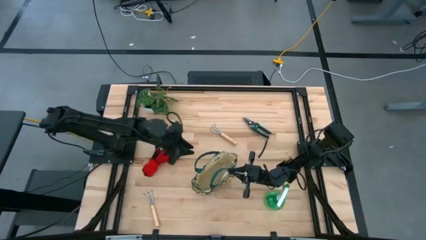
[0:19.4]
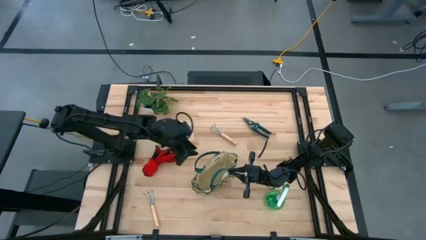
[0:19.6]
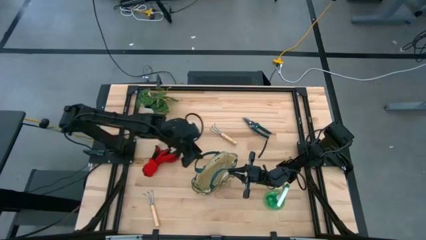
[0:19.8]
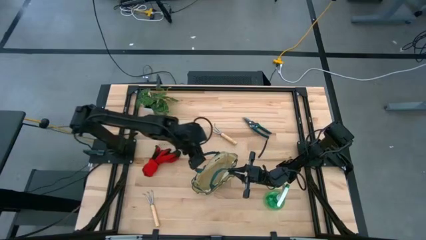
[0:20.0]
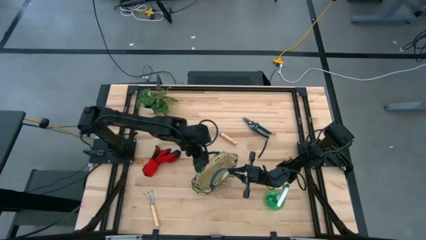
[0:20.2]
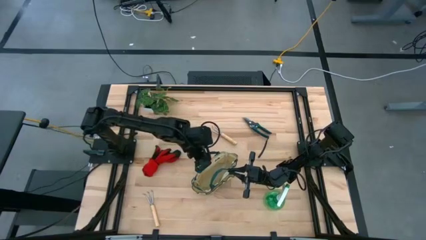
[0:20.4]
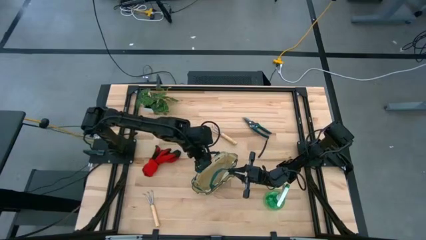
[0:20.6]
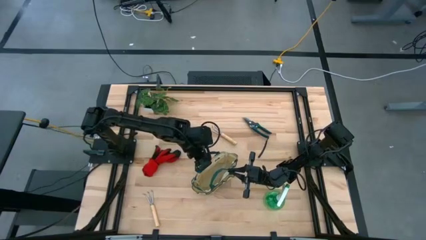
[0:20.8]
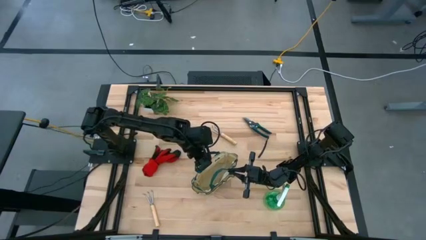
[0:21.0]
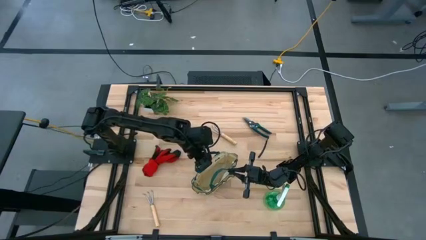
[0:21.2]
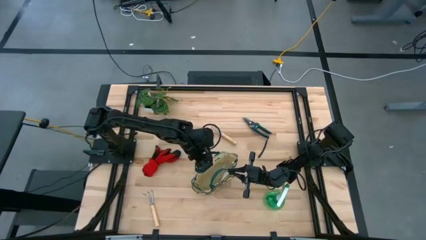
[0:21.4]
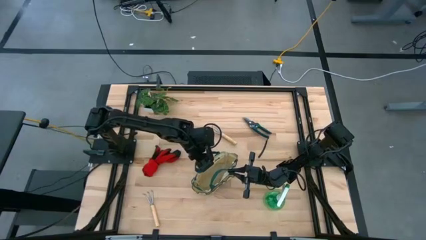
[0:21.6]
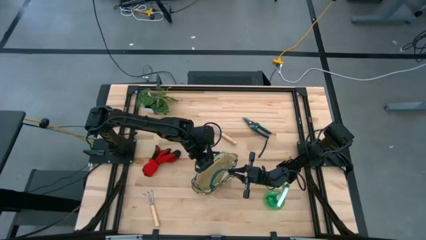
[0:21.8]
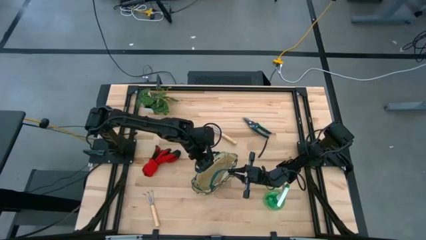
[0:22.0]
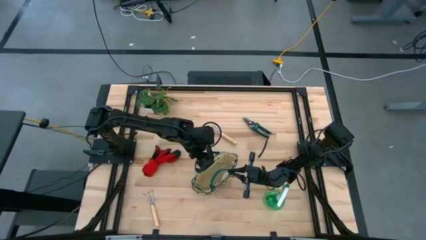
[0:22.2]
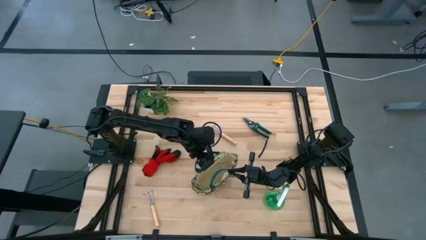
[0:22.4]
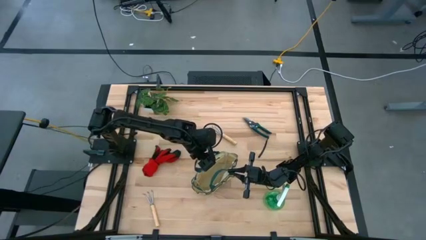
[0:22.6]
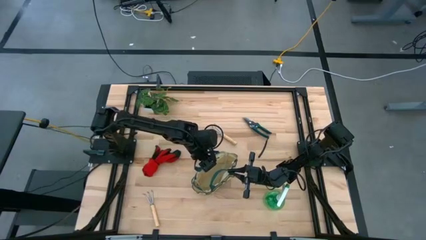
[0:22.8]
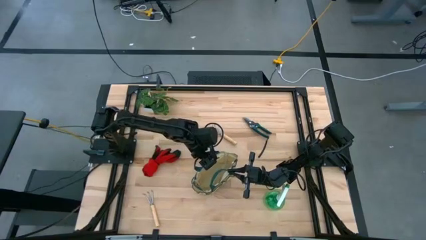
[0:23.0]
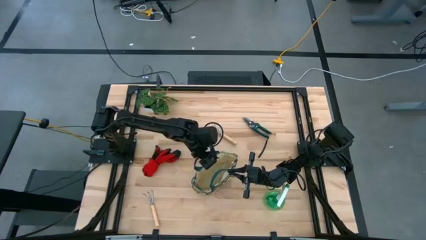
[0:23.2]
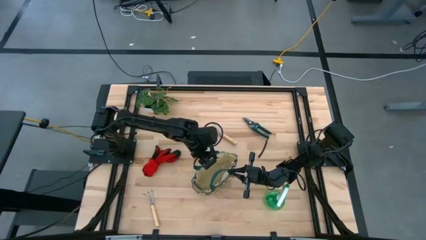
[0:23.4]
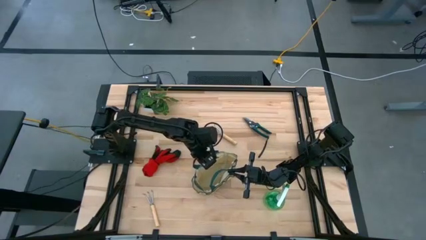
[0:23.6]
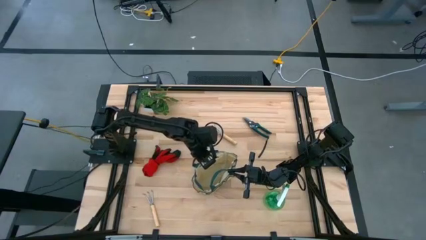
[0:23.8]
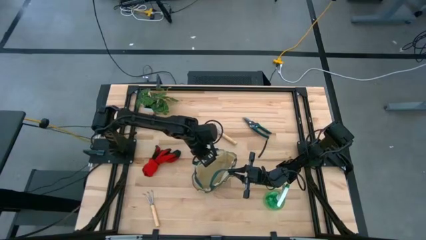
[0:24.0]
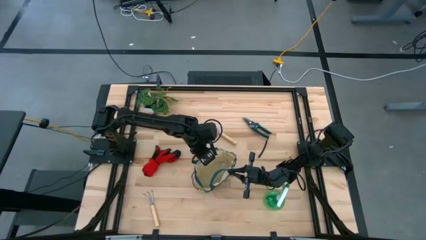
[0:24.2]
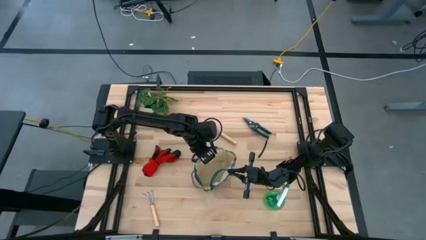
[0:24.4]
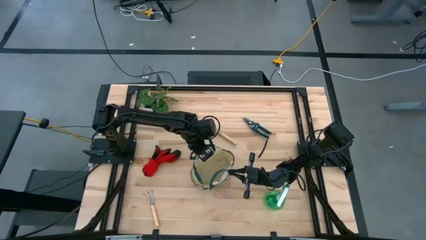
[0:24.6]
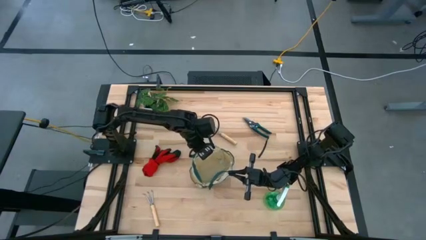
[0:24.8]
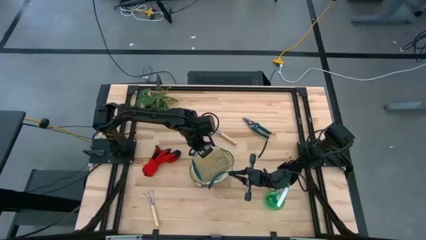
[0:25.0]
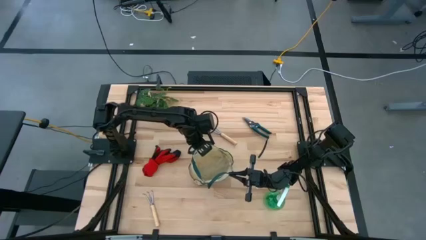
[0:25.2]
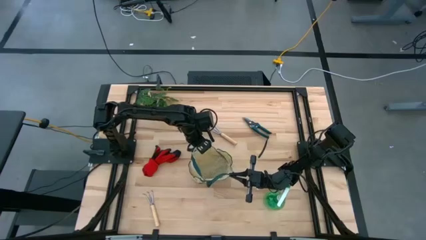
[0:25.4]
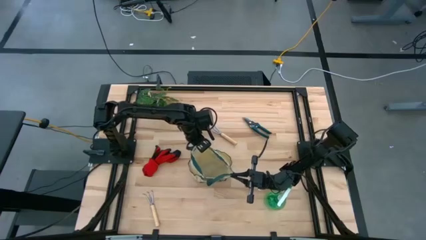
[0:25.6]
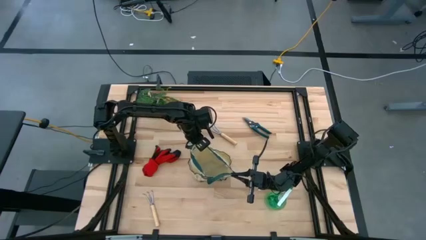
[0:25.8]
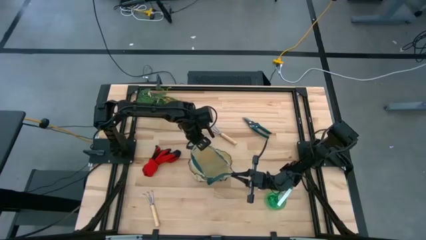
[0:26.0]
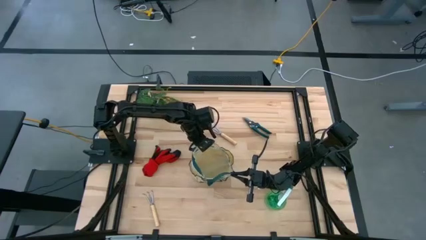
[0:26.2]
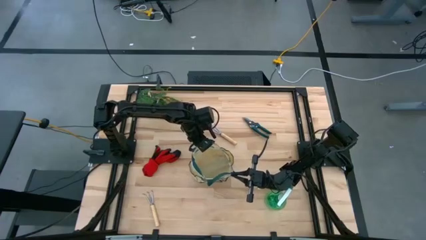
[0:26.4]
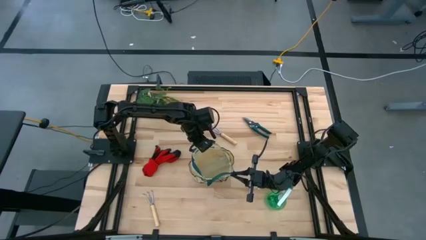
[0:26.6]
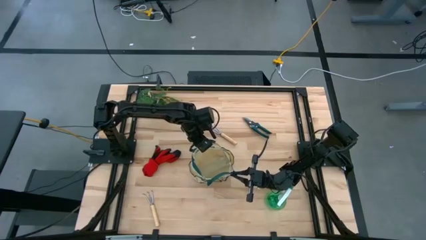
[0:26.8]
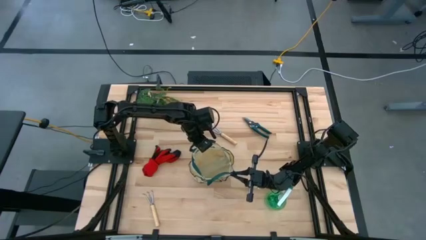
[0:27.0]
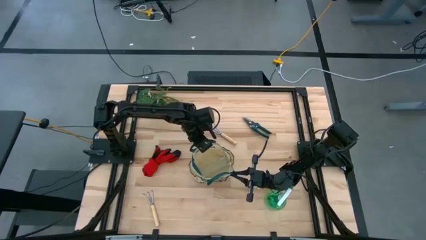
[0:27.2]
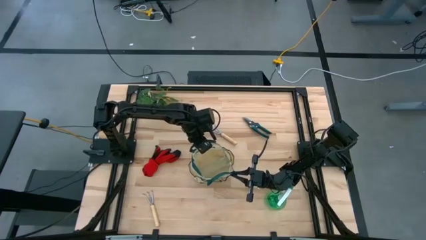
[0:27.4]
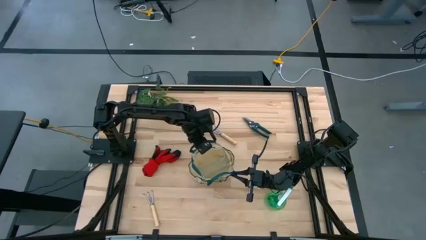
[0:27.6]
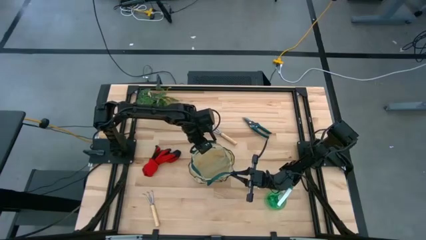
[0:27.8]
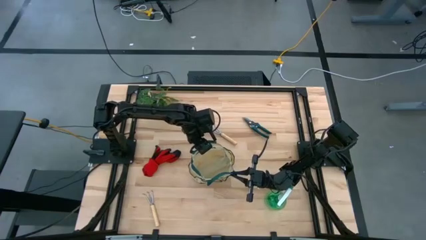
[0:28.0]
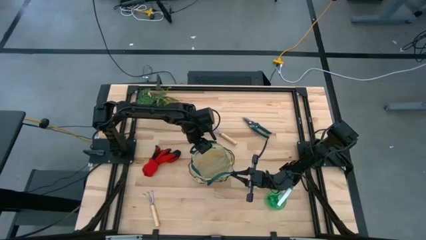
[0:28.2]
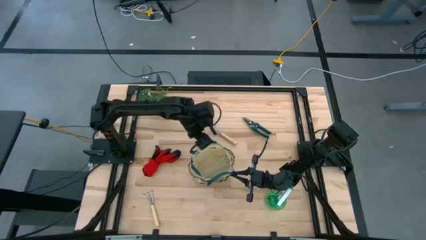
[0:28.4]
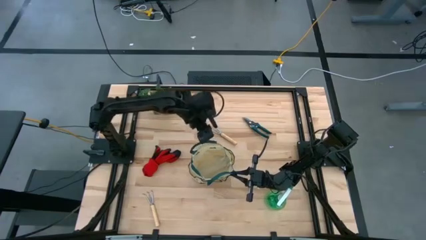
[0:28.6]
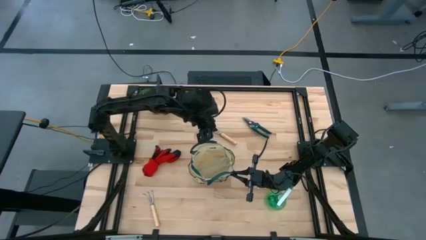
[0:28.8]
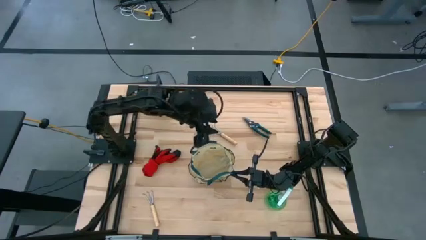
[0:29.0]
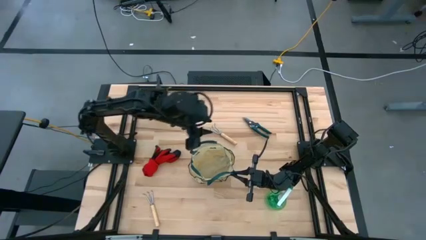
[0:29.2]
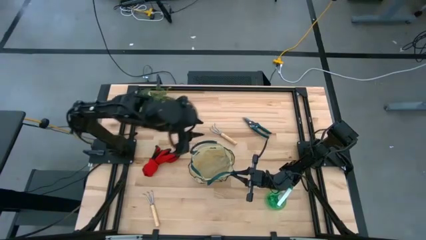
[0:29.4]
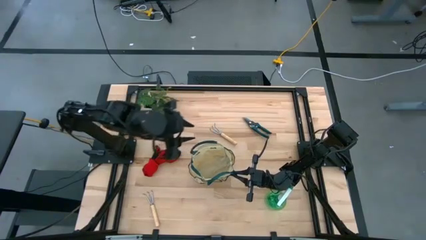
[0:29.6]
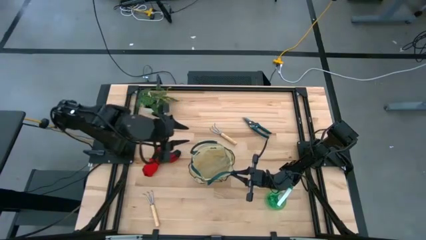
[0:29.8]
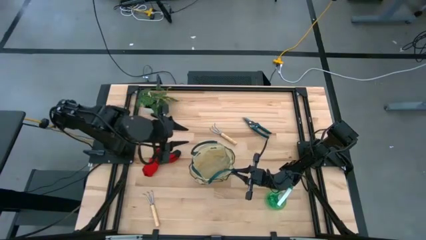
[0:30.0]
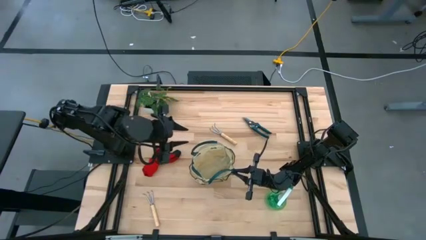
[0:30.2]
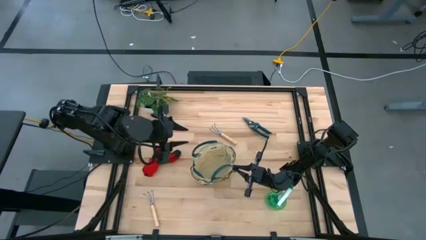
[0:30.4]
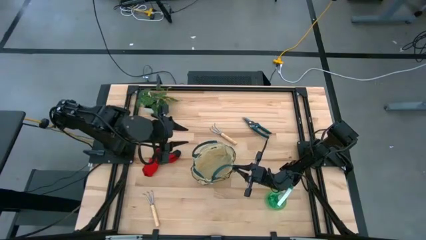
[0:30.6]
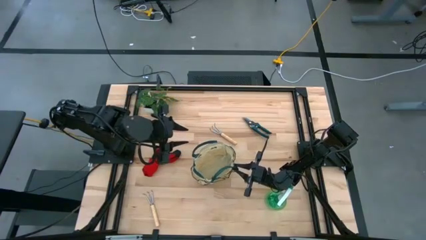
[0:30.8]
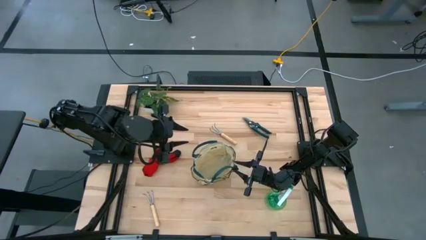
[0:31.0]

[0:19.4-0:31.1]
Task: Pick & Place Garden tools in Gardening bag
Prepare the green gardening bag

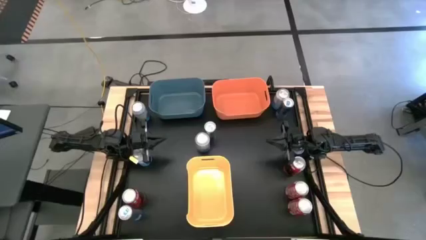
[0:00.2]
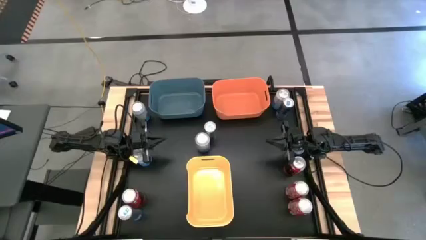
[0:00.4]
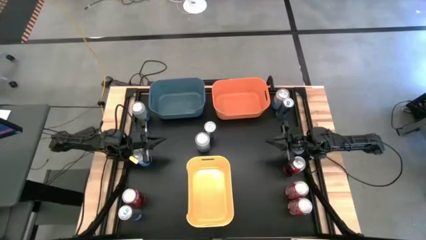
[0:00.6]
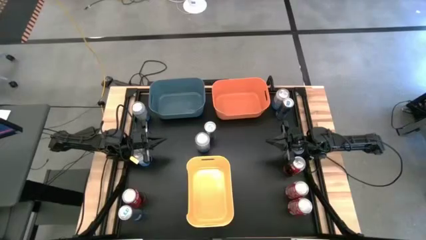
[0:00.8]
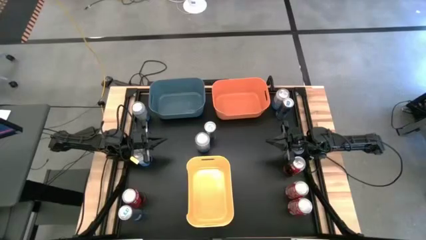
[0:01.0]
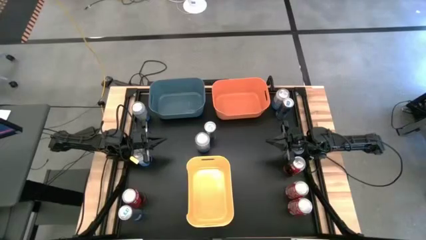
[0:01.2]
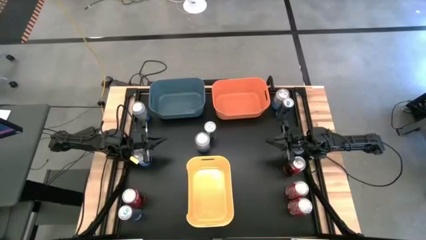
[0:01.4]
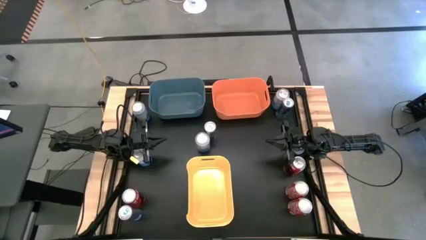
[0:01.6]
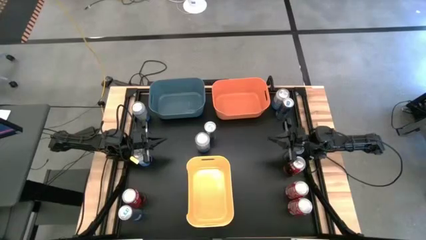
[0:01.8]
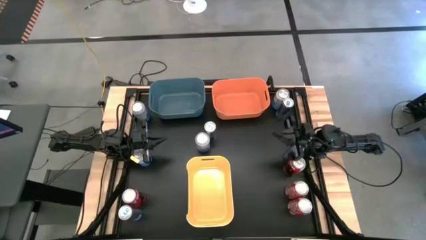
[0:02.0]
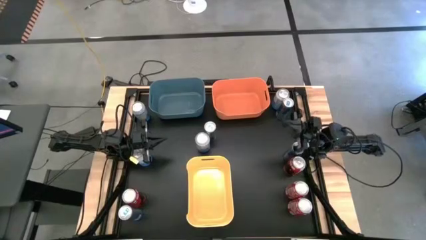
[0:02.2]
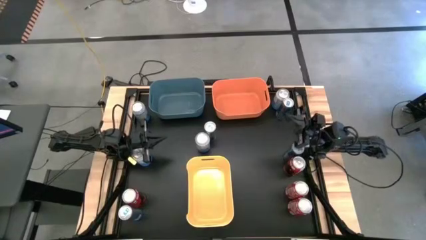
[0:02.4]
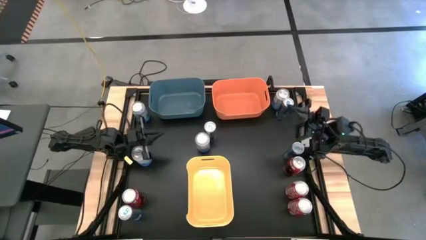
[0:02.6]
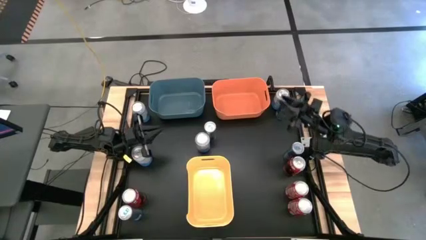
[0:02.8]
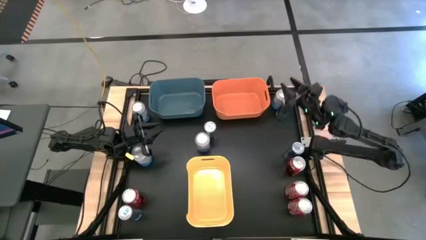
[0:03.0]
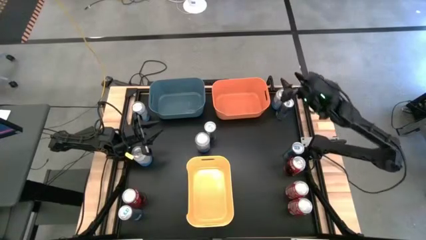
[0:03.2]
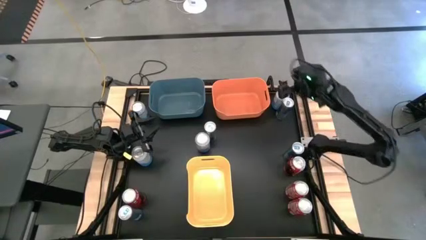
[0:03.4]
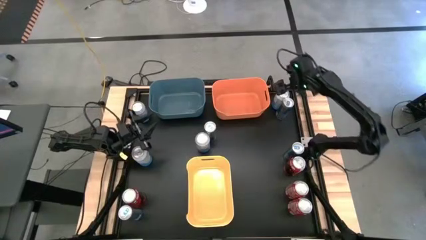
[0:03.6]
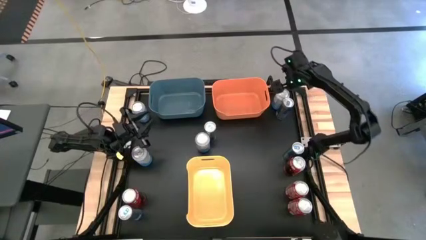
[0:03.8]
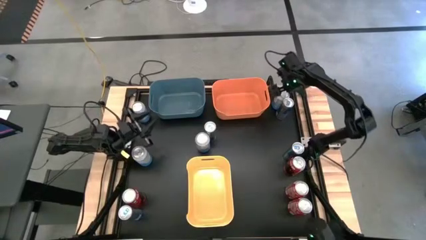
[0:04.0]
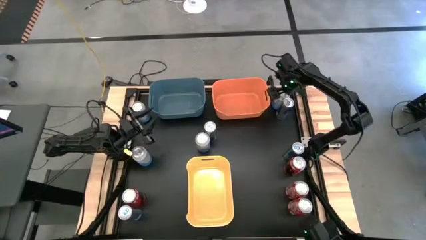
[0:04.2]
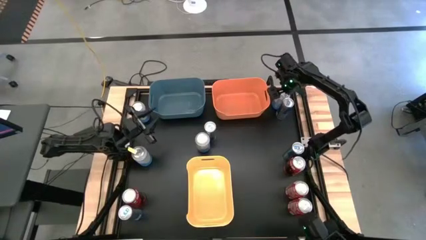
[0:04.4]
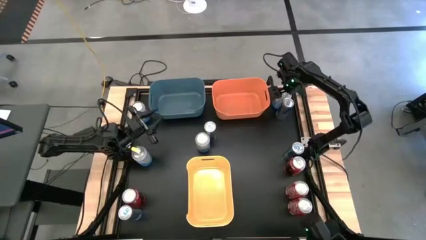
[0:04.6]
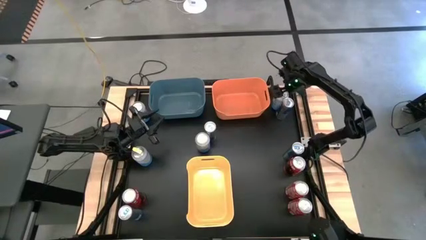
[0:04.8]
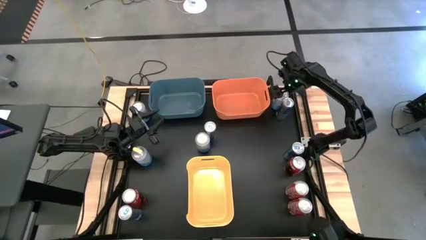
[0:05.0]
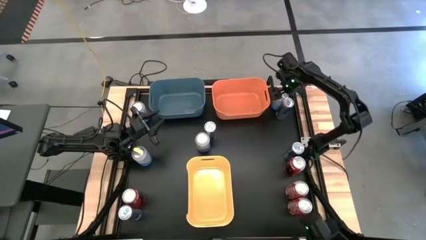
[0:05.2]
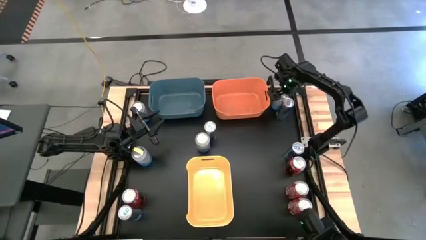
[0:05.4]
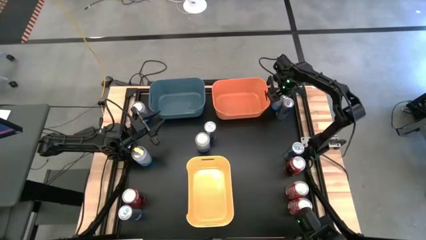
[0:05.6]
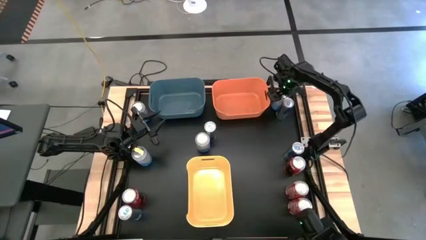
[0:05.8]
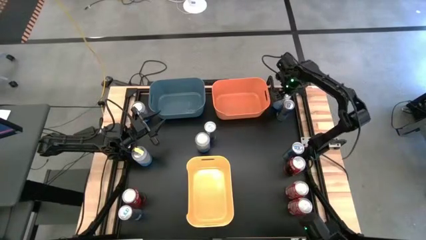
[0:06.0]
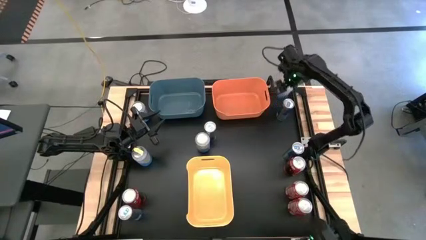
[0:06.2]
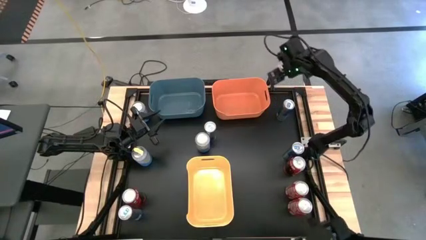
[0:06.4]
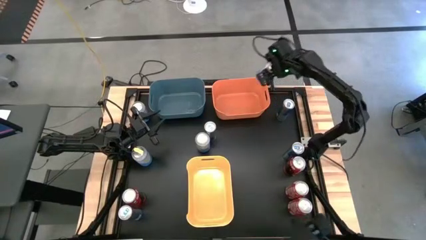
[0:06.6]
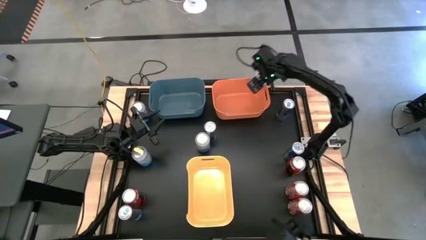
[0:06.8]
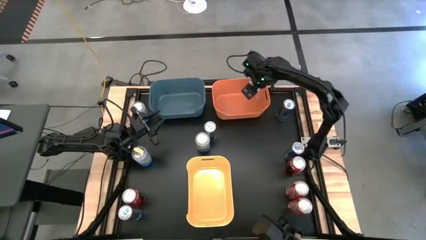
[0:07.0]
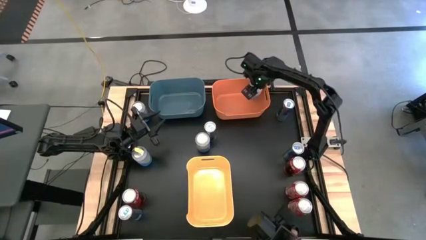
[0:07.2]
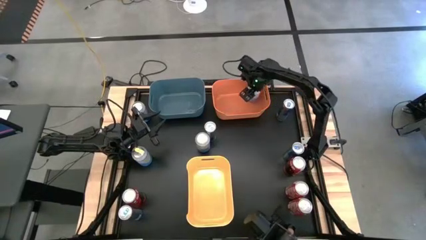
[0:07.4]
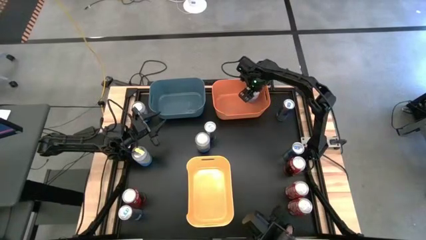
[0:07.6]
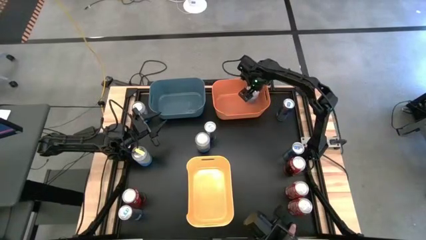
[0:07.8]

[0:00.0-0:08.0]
Task: Sort soda cans
Put the blue white soda can into the orange bin
